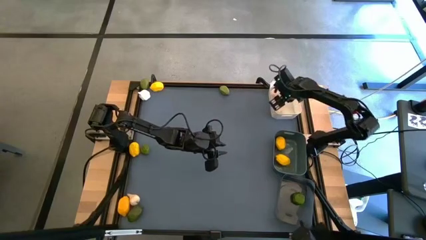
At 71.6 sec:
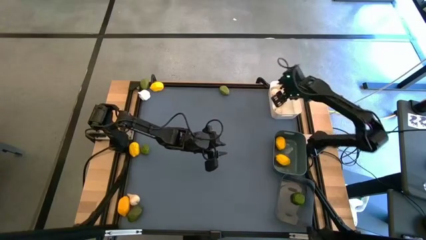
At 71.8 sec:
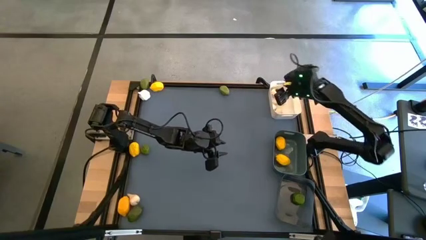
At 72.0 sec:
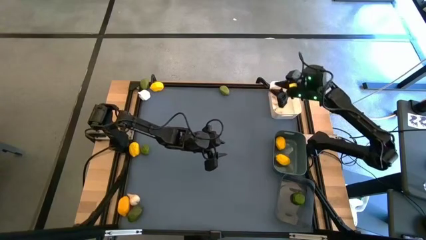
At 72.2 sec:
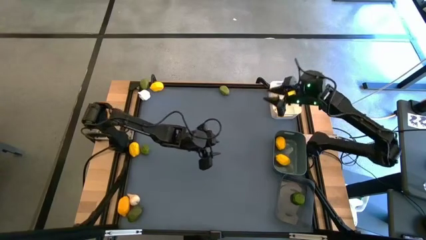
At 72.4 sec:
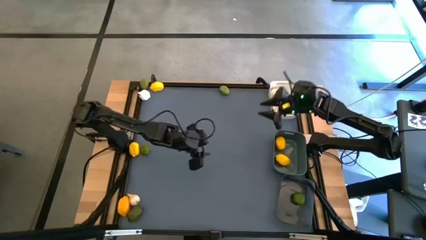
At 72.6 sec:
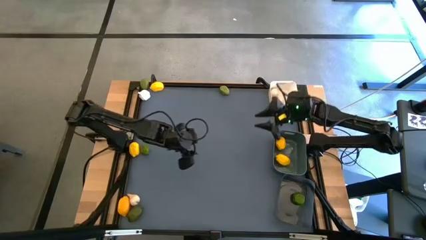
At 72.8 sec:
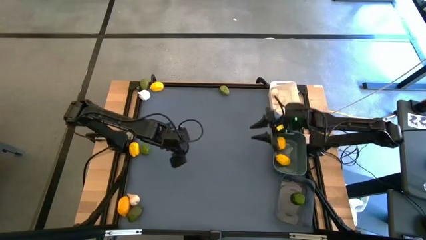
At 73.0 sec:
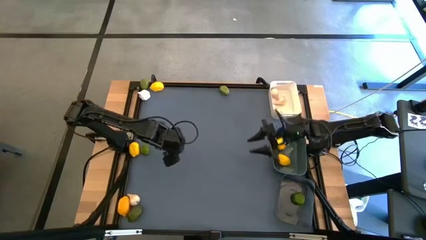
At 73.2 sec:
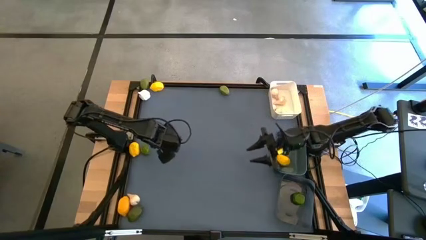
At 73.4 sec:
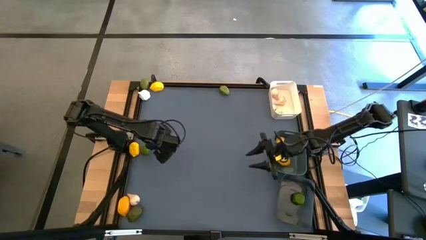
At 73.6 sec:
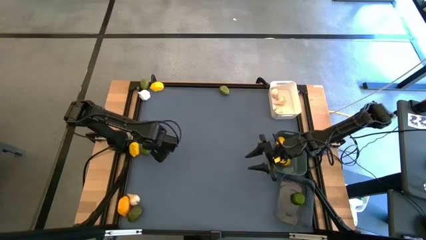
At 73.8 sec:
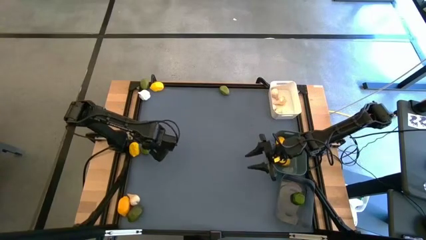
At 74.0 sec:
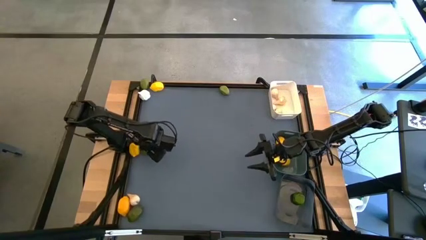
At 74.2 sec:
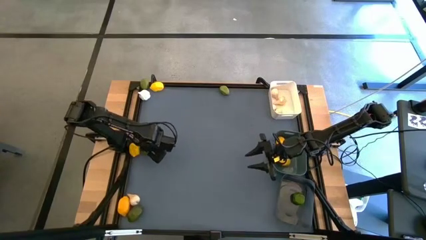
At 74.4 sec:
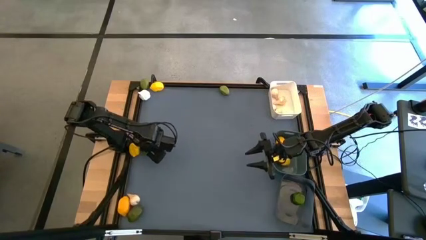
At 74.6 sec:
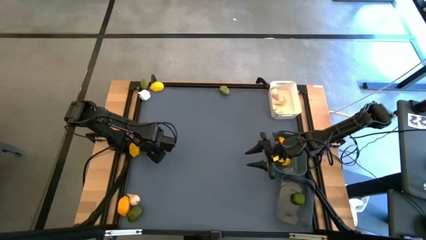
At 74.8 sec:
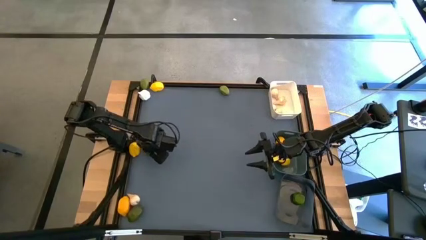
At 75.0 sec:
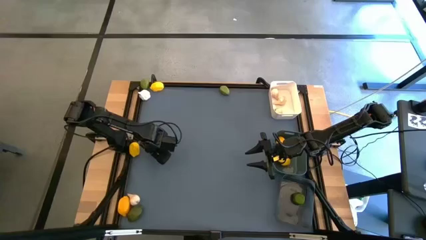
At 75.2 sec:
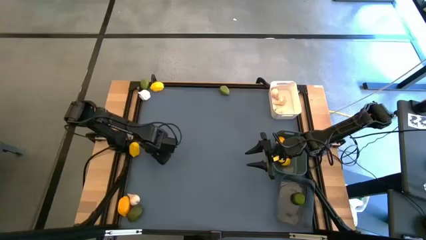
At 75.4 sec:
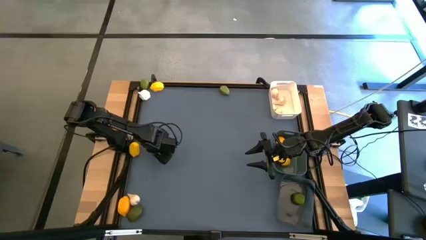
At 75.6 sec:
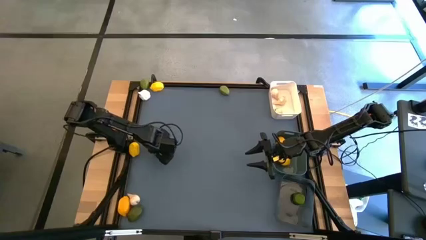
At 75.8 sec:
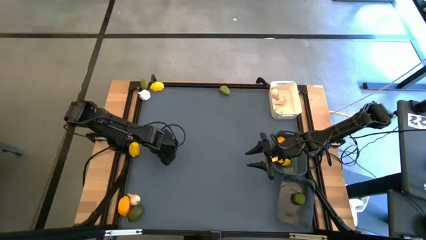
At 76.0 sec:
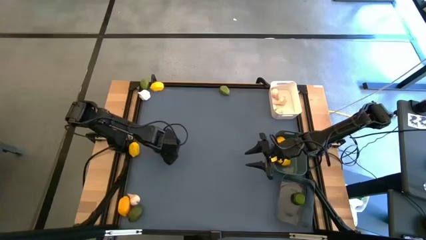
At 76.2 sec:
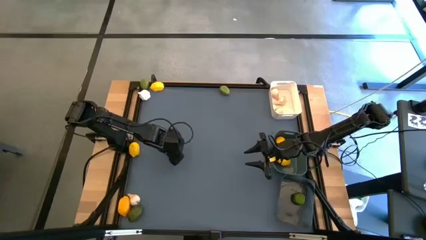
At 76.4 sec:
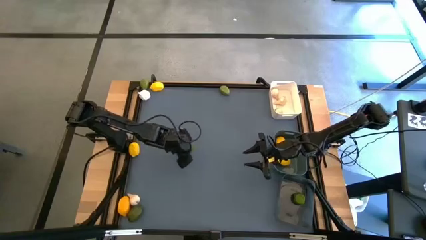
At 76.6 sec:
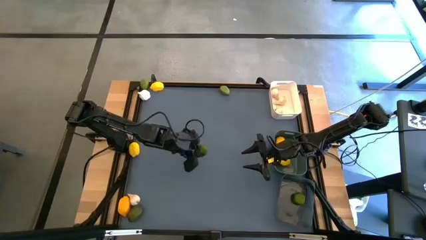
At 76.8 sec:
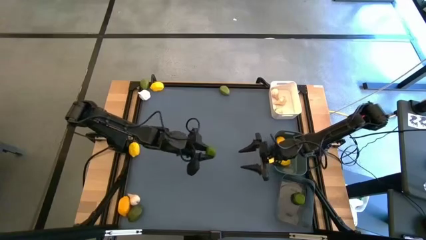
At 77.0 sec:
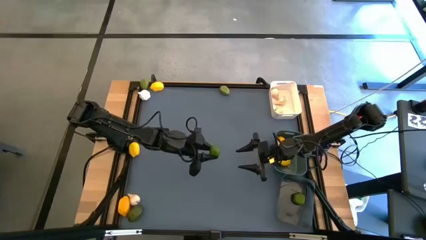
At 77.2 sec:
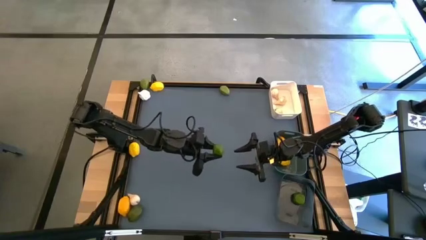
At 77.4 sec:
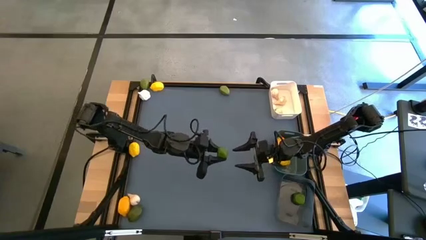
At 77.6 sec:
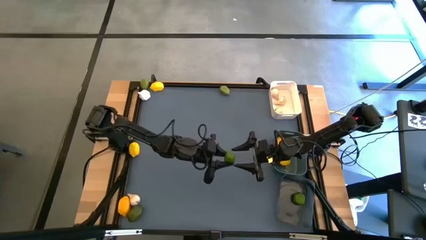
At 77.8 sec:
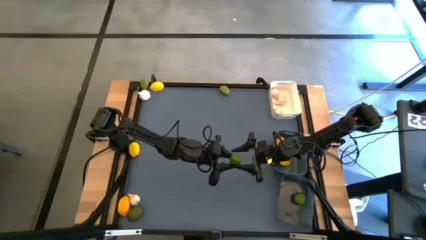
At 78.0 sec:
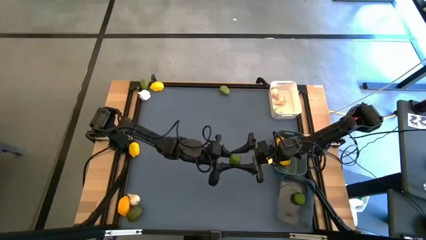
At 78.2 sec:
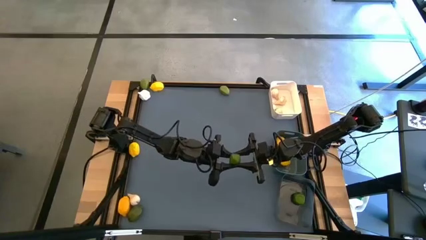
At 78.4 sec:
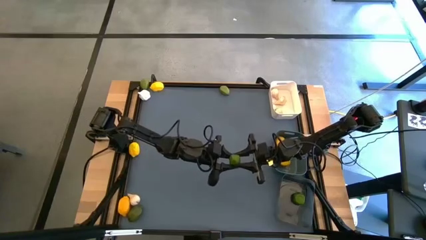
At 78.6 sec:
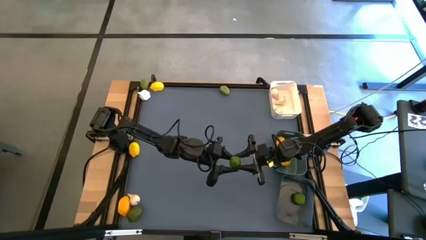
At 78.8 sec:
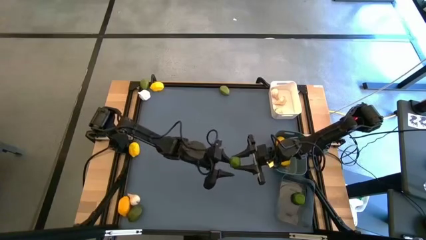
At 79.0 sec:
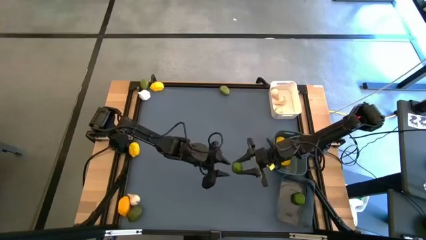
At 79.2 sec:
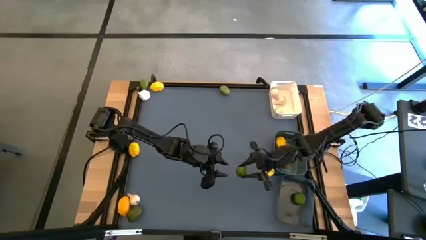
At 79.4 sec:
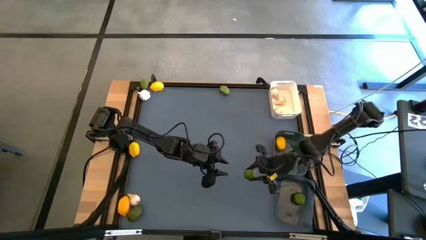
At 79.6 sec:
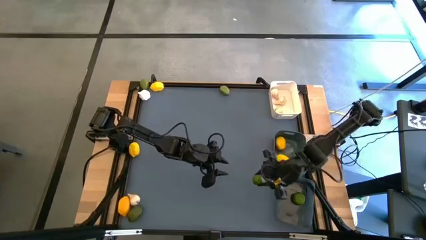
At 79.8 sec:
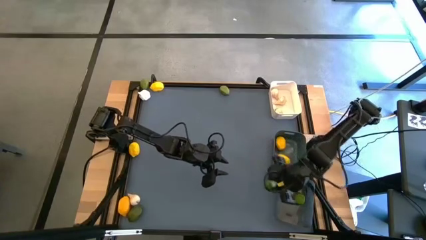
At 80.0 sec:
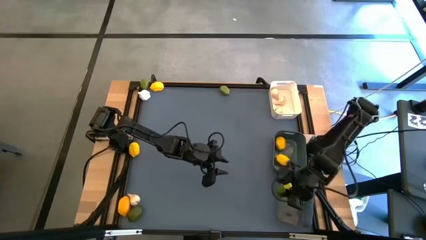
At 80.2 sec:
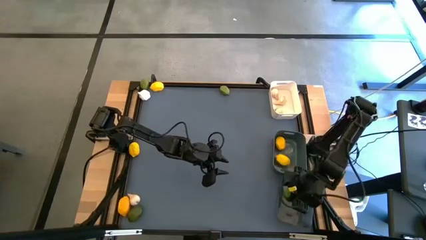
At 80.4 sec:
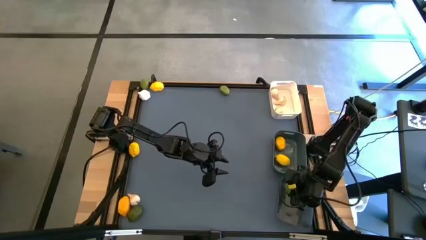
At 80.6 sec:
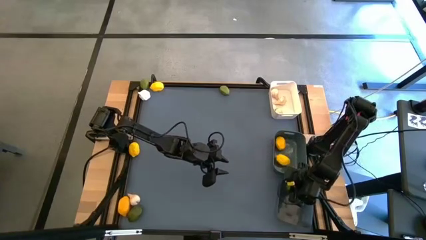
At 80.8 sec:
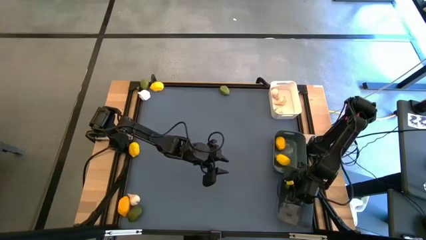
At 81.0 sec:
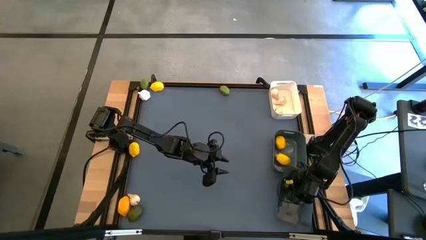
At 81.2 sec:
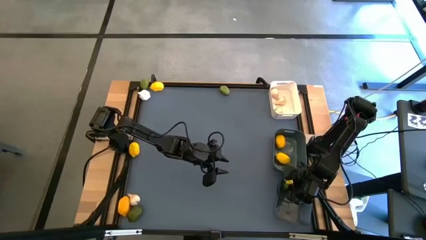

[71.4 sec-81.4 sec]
Task: Sort produce into baskets
Put the green lime into the black bin

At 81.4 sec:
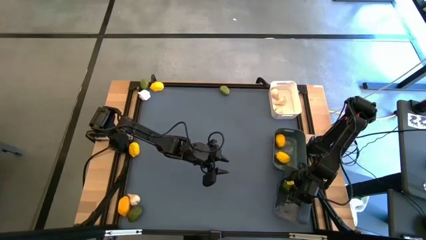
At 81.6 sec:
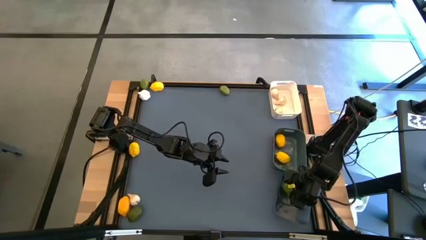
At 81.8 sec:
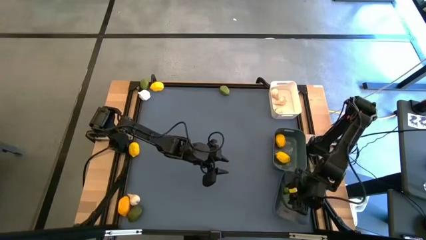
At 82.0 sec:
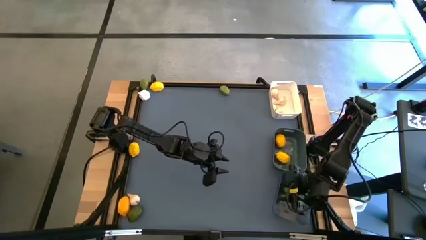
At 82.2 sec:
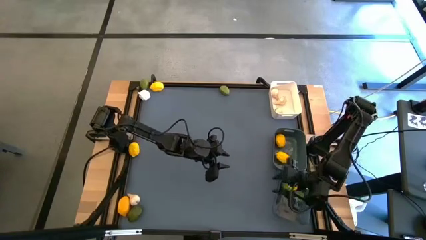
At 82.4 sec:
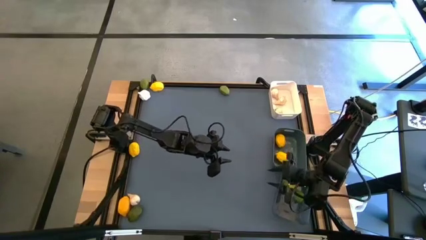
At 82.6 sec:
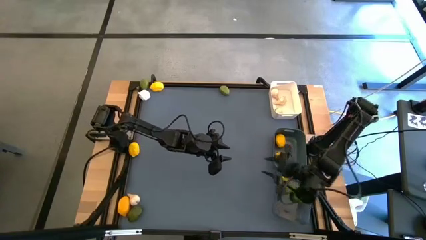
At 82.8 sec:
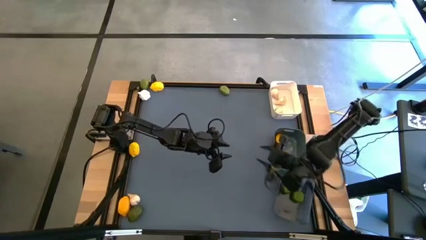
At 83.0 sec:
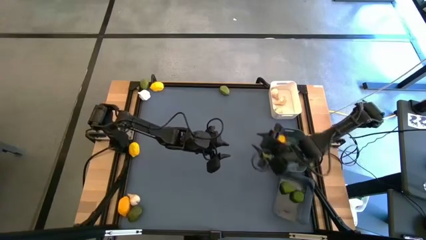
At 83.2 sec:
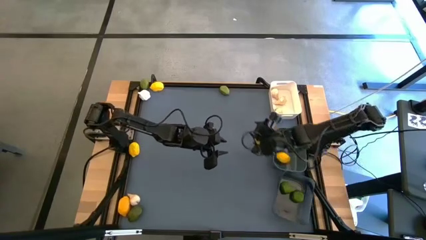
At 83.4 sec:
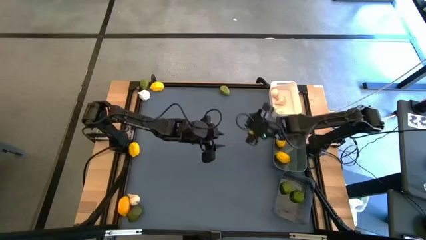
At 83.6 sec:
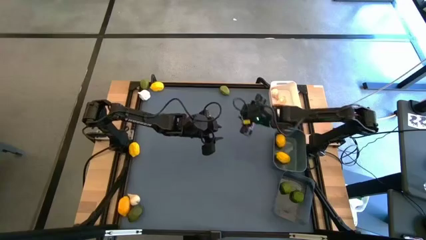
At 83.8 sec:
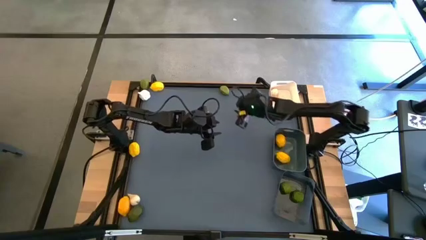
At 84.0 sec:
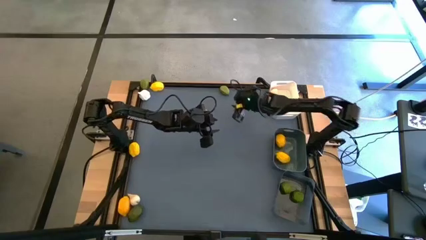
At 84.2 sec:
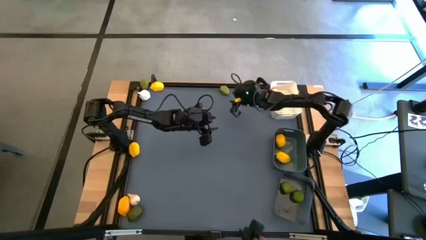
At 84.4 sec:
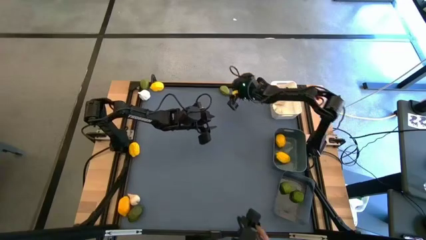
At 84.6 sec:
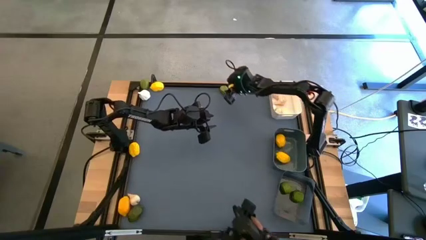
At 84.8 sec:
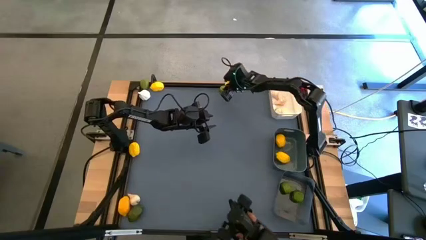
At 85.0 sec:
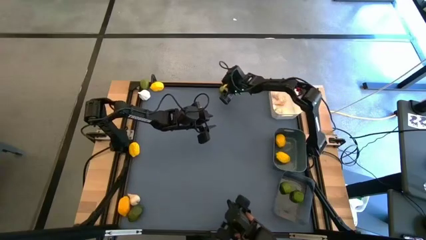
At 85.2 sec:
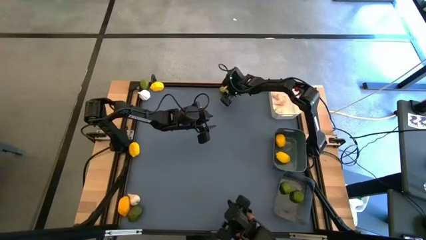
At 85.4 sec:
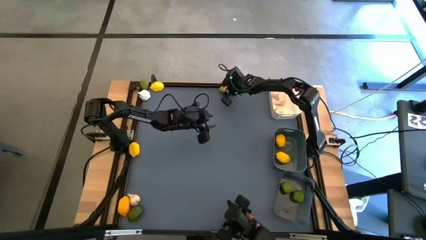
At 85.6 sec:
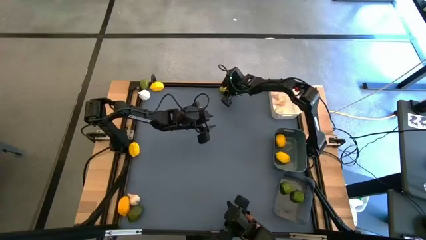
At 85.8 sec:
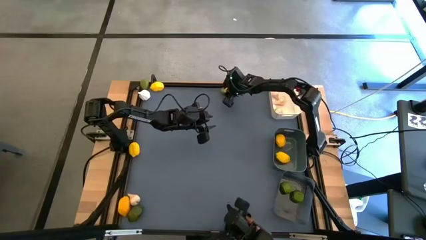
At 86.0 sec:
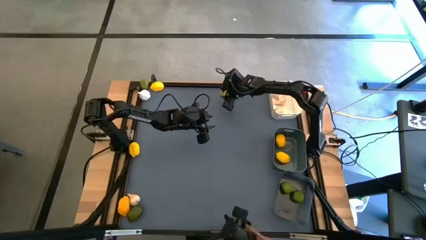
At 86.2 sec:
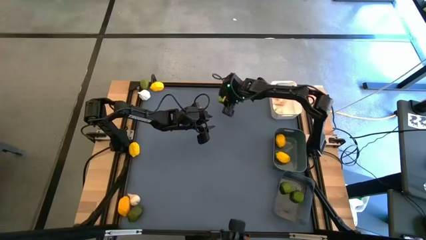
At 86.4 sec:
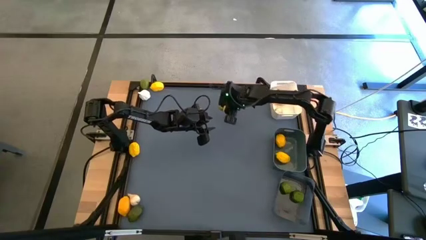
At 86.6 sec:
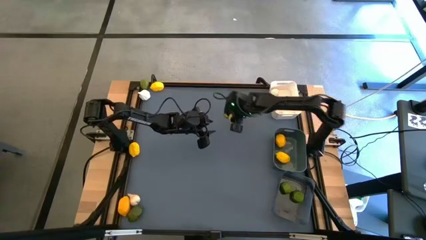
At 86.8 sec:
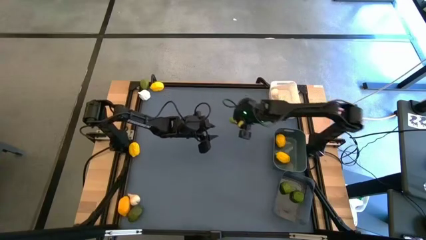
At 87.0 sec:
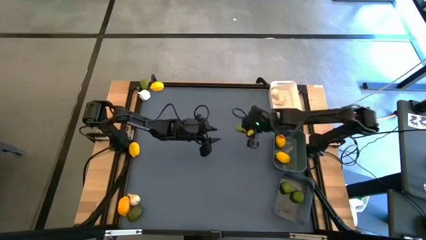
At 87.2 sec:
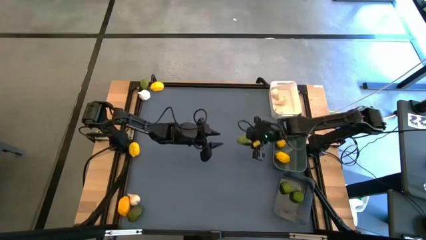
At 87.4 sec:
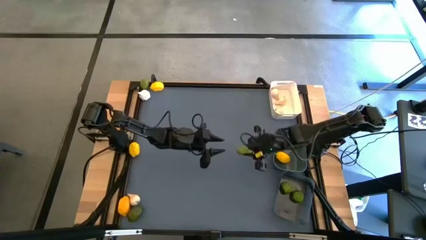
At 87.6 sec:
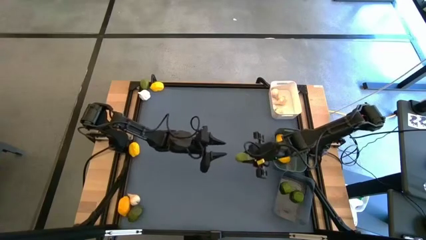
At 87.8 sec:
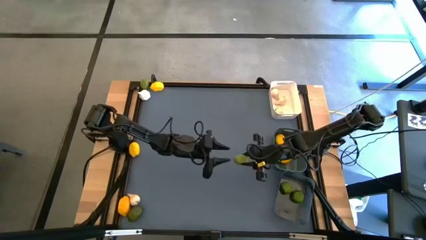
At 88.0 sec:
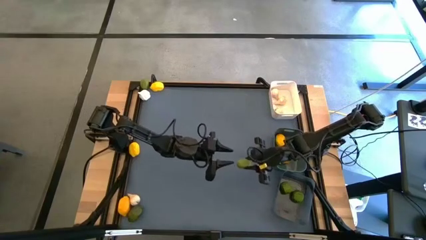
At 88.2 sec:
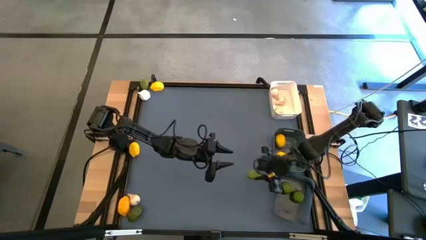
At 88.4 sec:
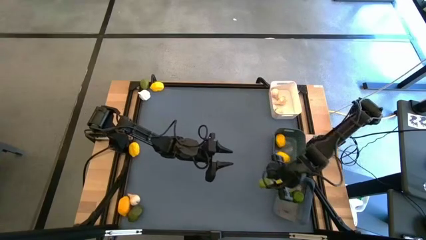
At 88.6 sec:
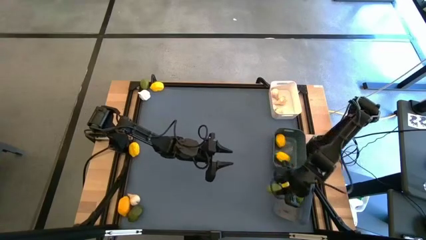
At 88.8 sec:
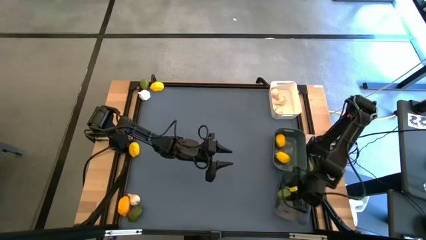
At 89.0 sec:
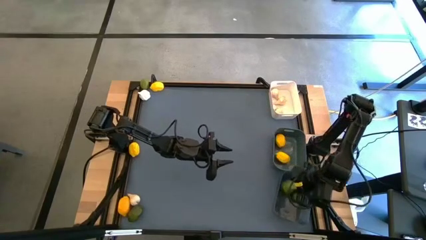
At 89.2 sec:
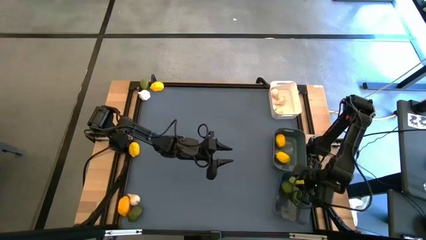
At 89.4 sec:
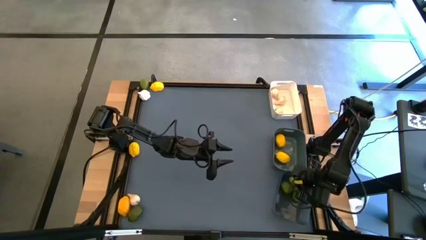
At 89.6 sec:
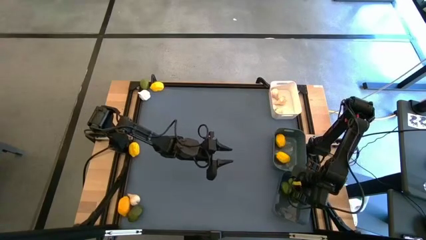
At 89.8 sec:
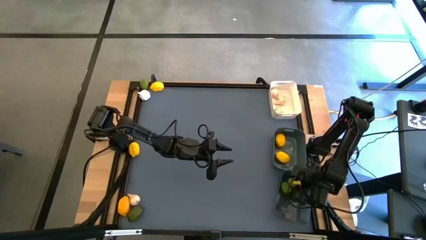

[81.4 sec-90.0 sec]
Put the green lime into the black bin
